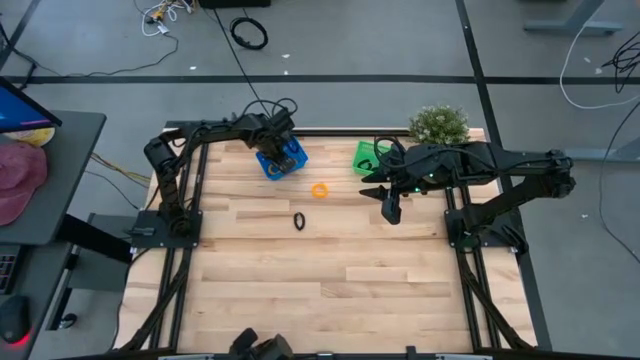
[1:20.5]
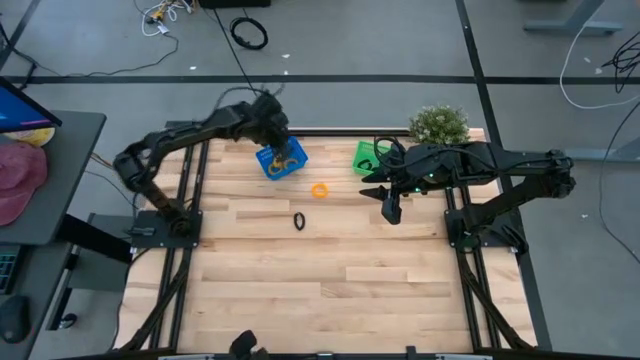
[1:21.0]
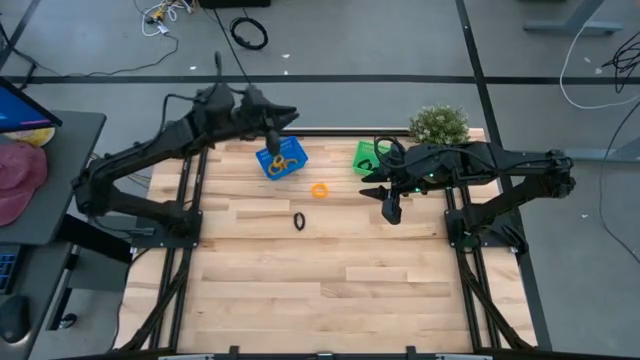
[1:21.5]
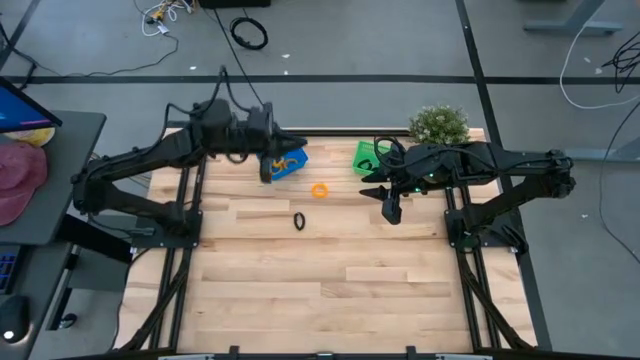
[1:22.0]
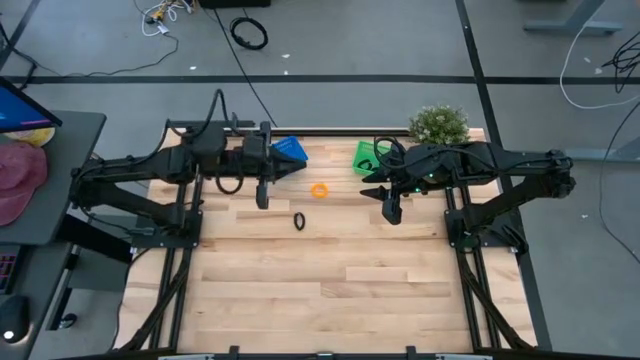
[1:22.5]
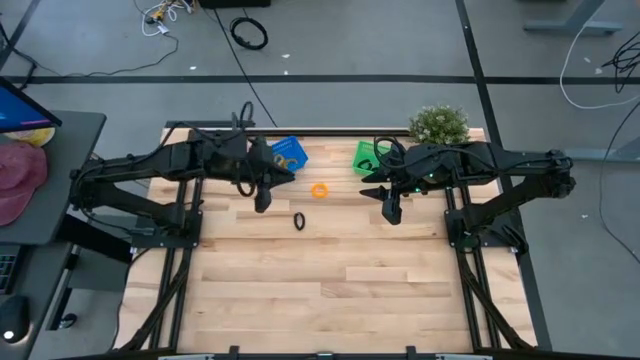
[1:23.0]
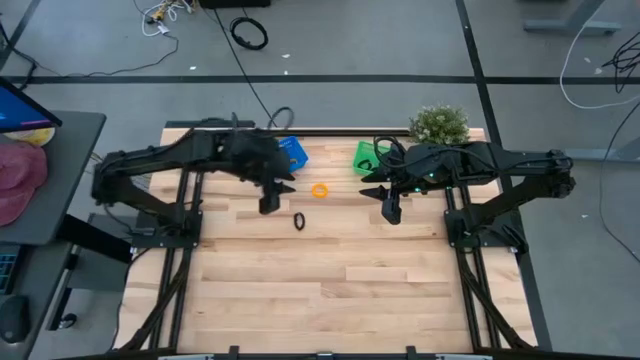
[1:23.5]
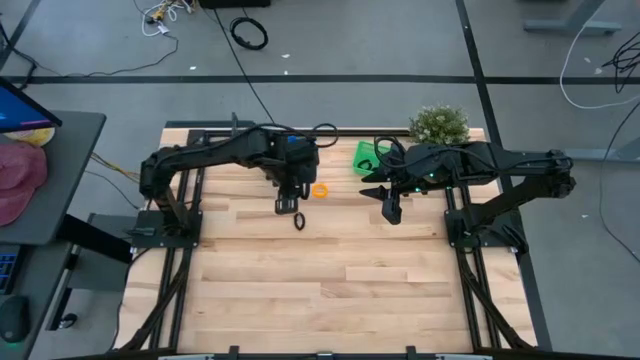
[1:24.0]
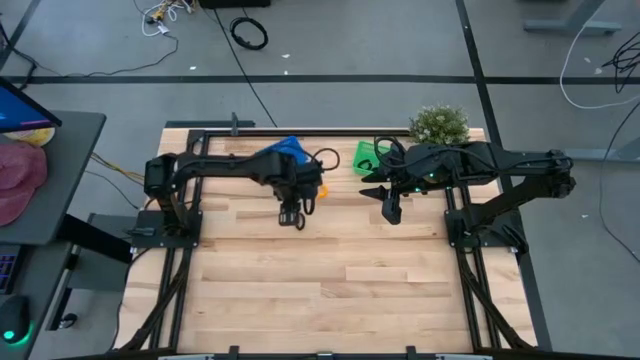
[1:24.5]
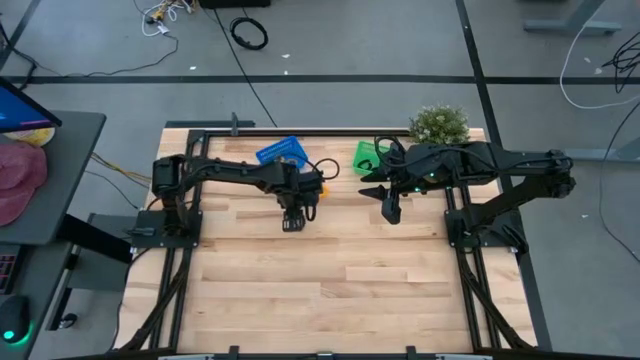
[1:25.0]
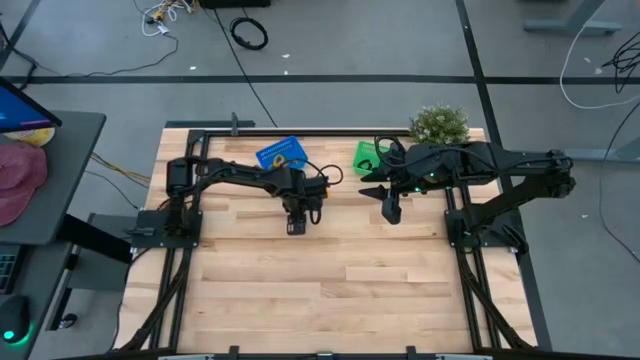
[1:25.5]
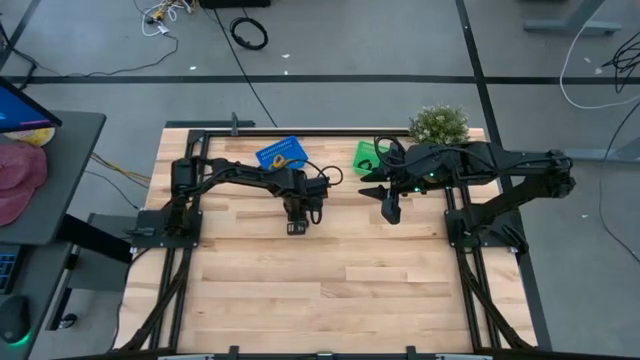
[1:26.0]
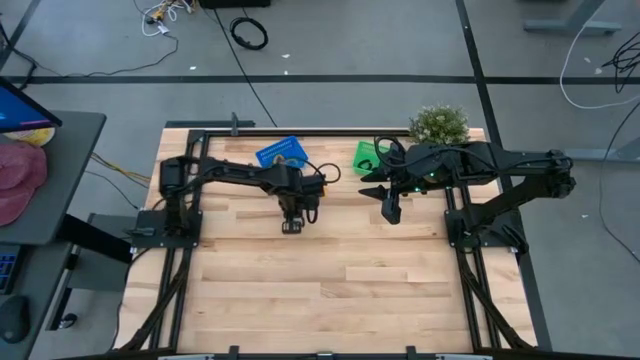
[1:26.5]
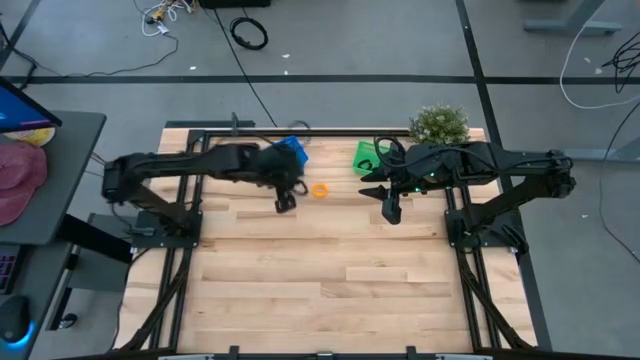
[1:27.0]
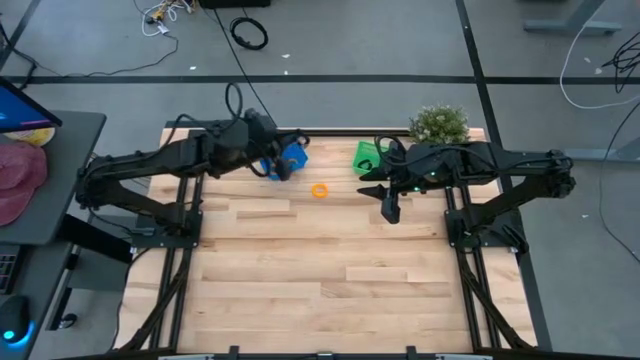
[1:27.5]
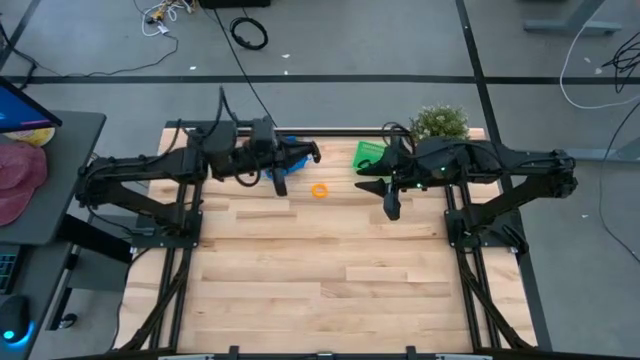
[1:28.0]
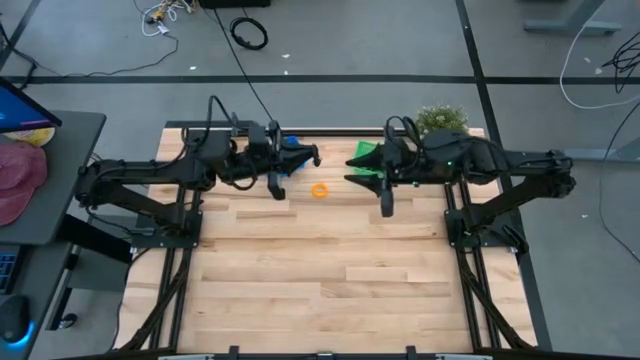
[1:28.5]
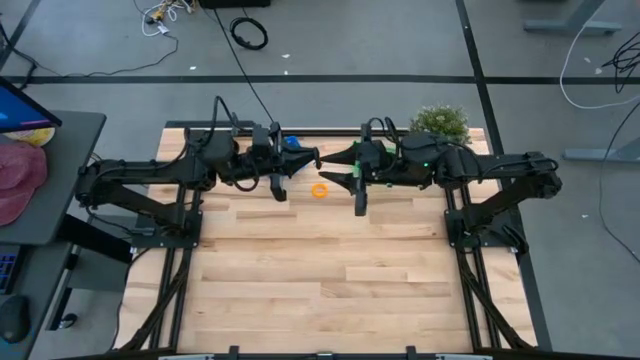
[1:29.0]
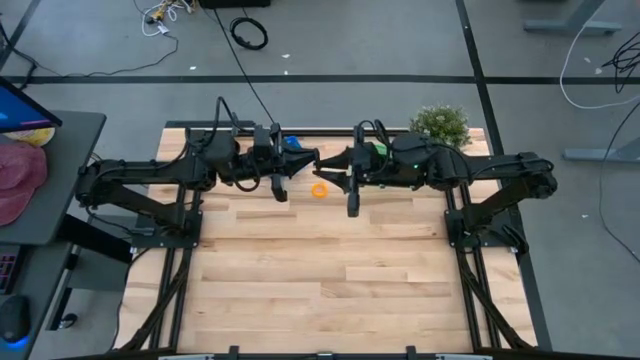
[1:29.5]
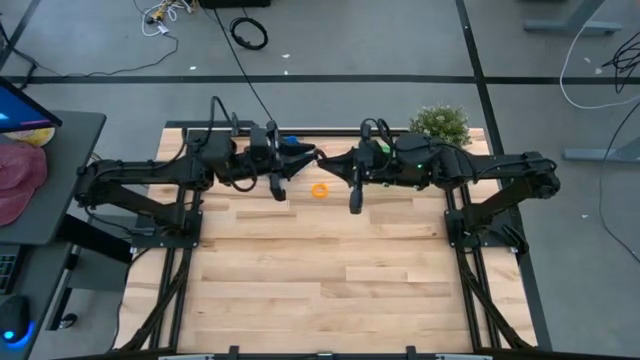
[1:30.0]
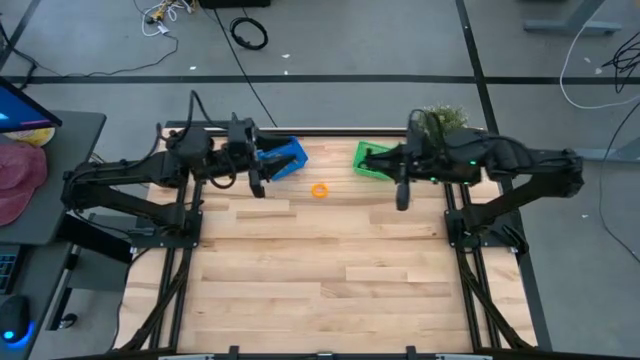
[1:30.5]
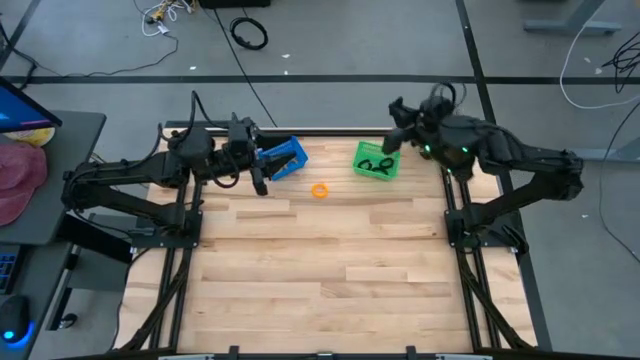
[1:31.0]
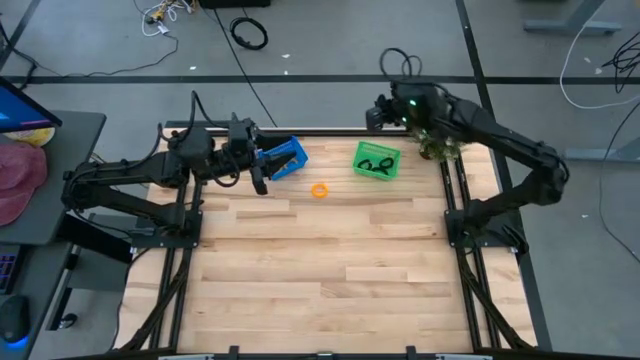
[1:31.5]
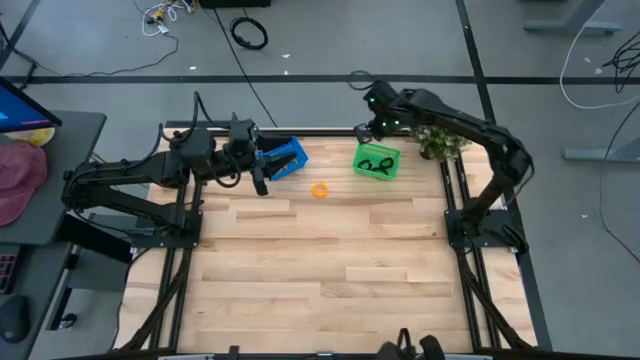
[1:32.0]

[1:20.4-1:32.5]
Task: Sort spring keychains
Put the black spring keychain into the green bin

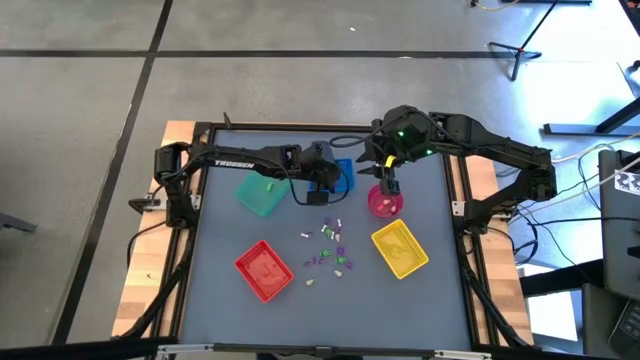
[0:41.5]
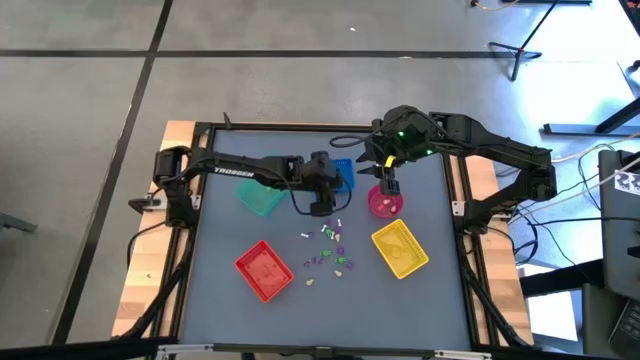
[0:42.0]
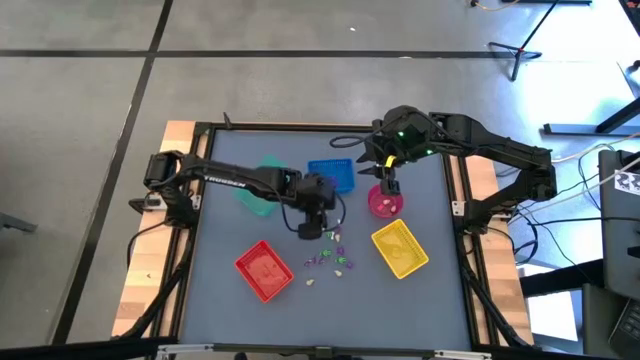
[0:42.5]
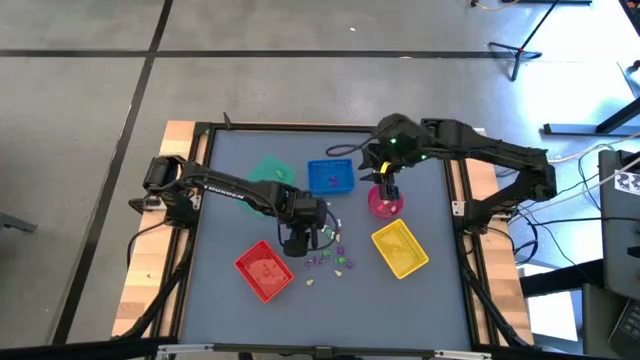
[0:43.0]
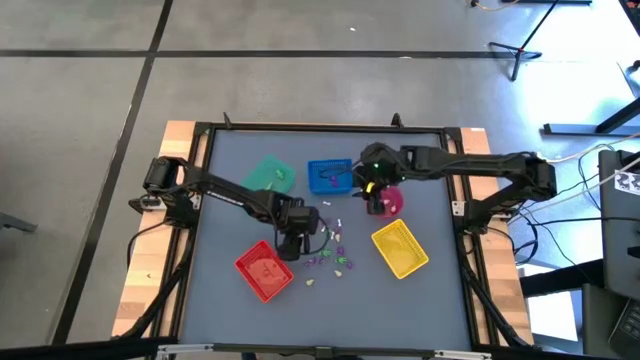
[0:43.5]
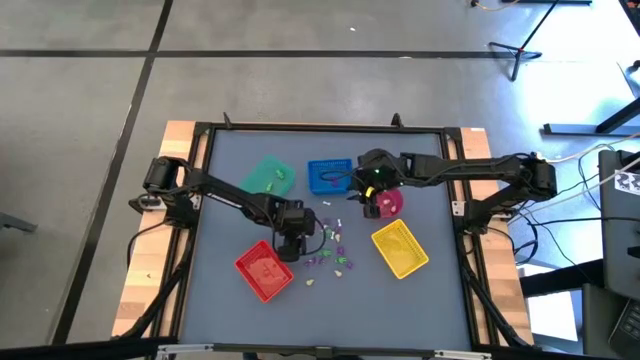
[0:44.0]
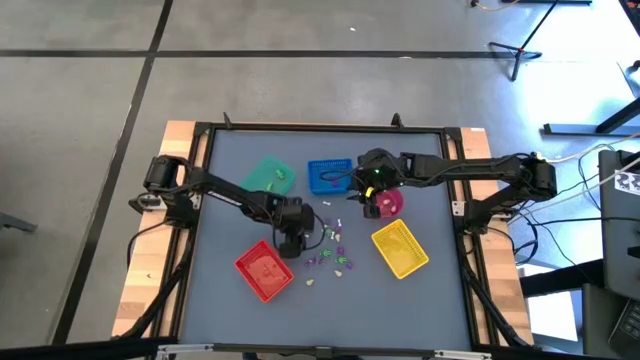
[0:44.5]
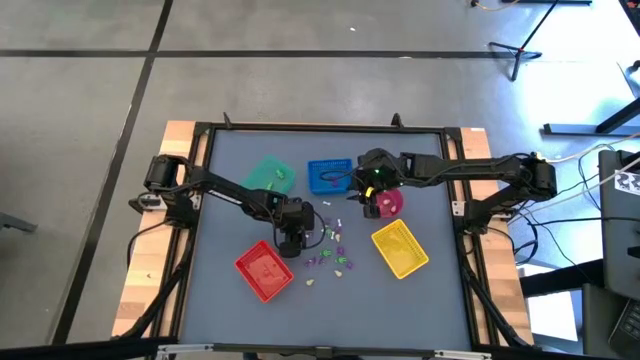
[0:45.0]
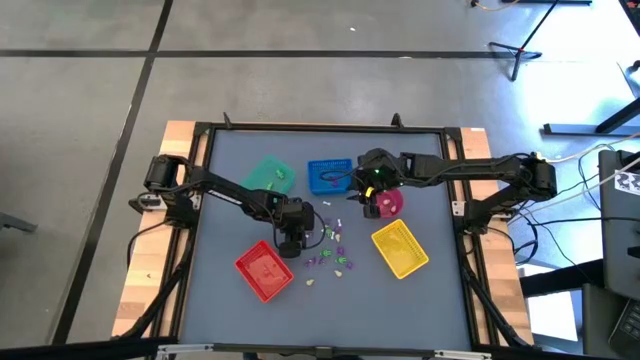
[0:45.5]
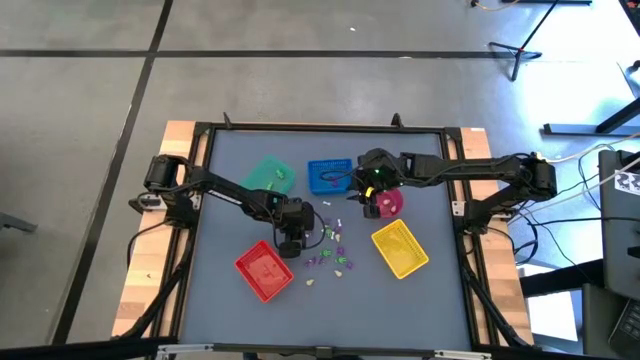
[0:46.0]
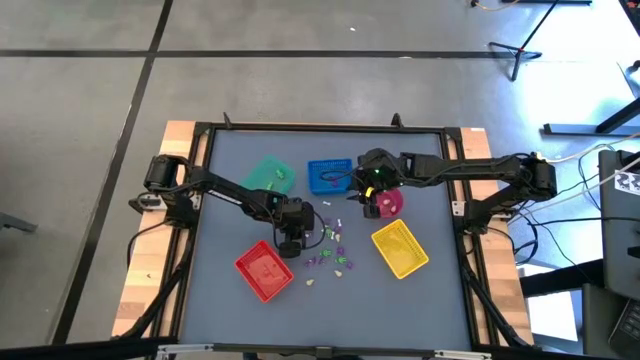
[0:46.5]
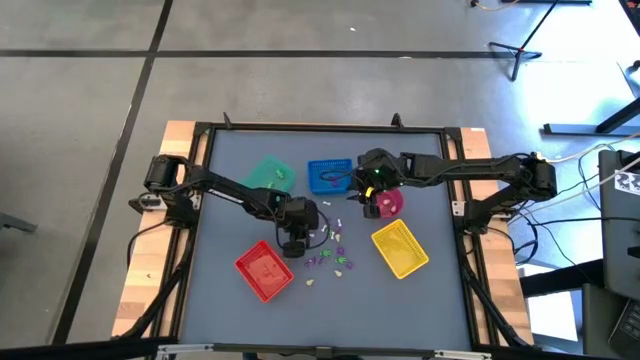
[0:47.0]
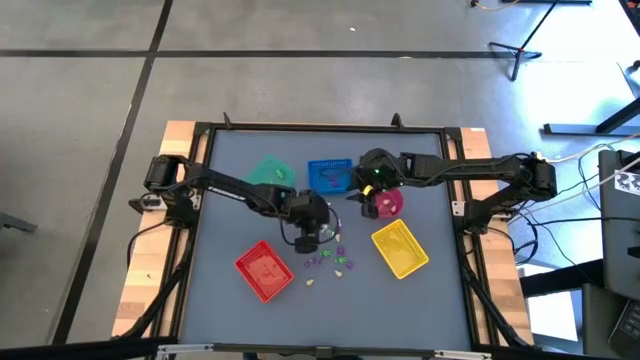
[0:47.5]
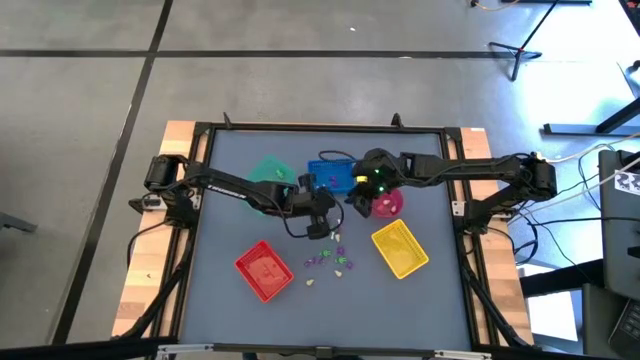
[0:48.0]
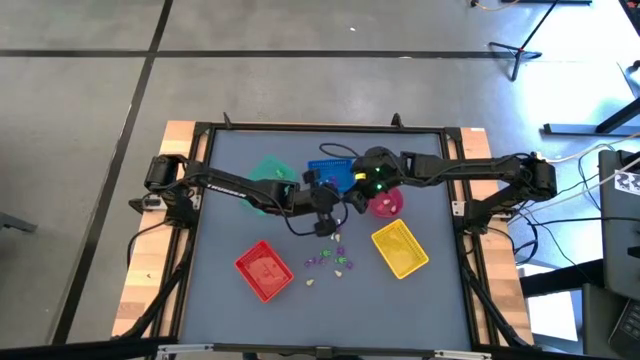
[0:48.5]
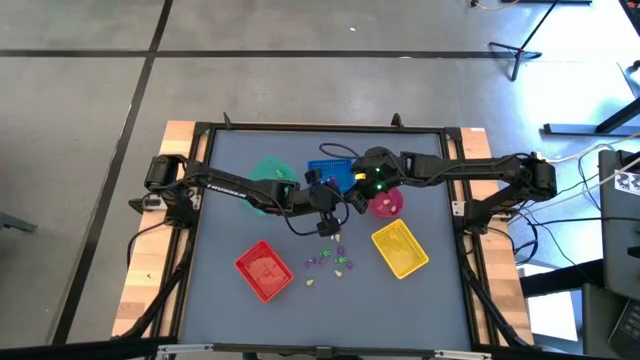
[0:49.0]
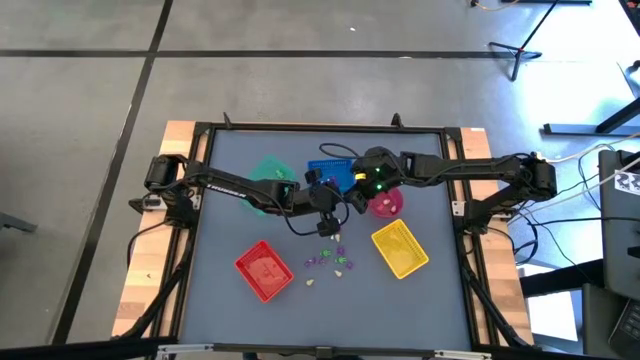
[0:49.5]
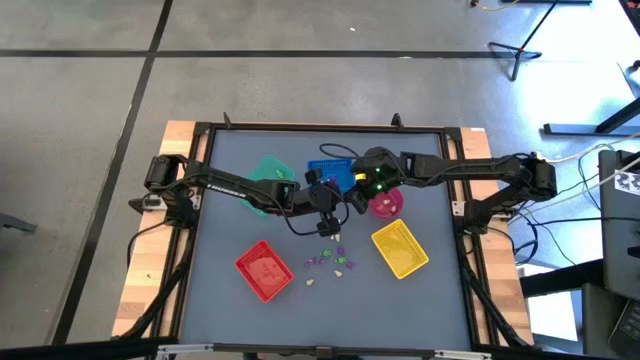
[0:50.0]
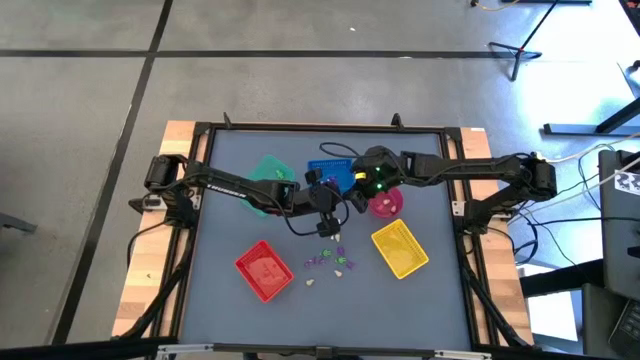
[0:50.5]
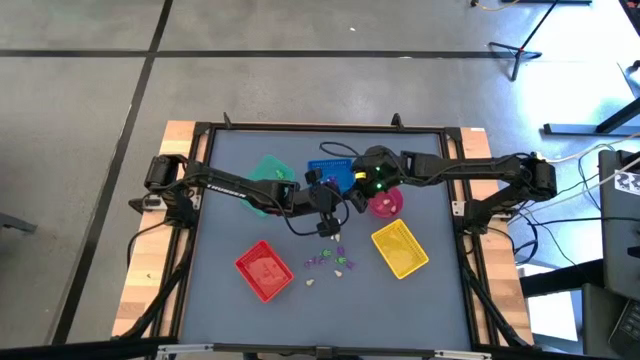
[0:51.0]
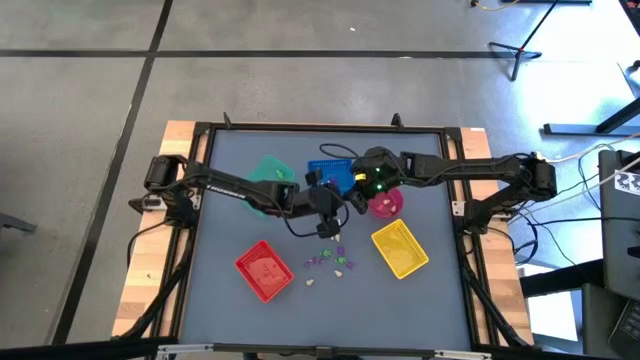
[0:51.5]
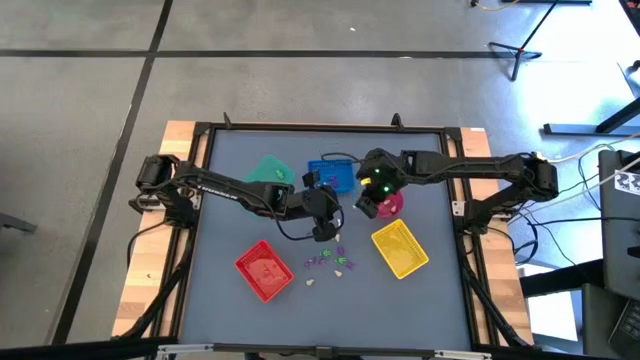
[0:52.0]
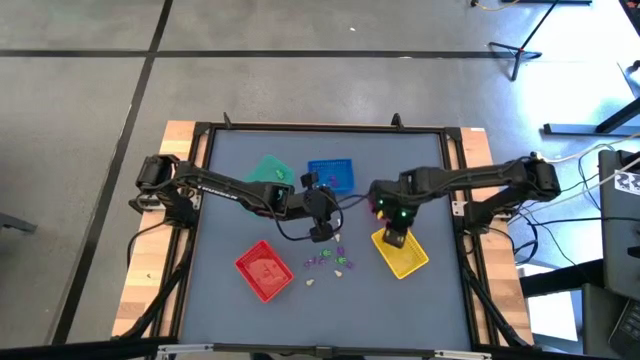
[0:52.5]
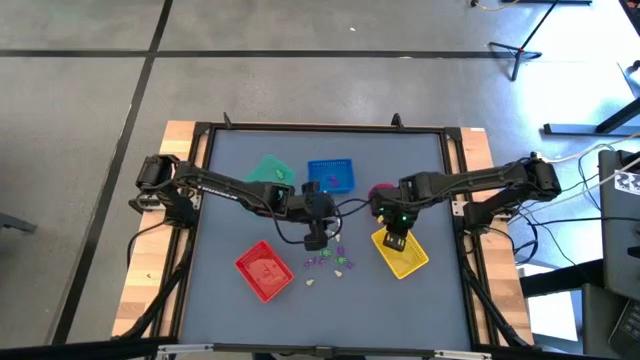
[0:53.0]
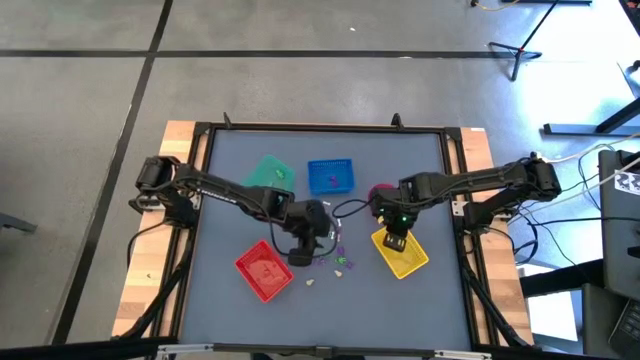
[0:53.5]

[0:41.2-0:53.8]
Task: Sort Halloween decoration
Put the white bone toy into the yellow bin
